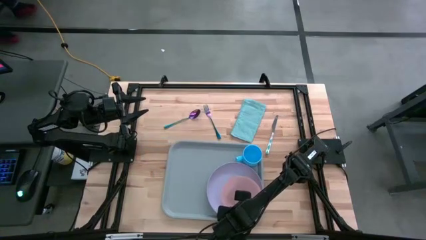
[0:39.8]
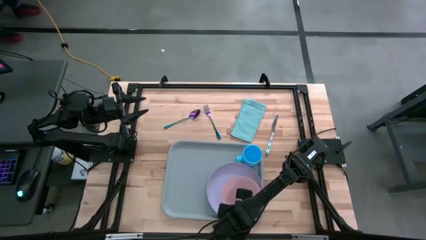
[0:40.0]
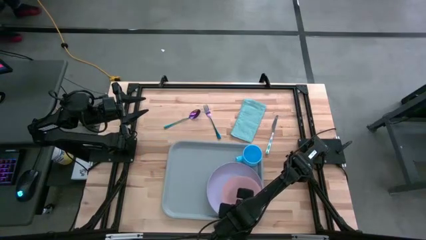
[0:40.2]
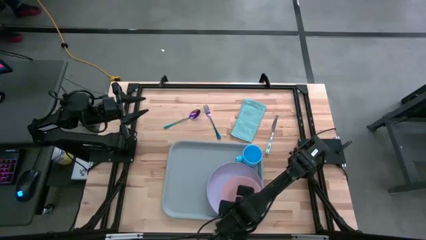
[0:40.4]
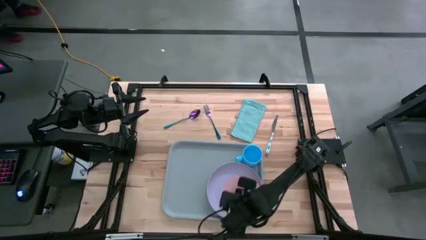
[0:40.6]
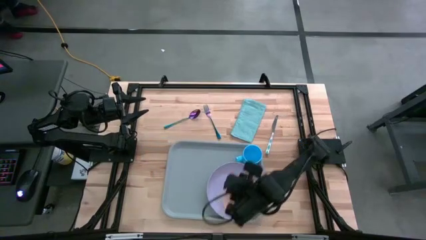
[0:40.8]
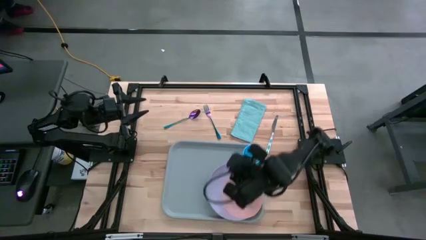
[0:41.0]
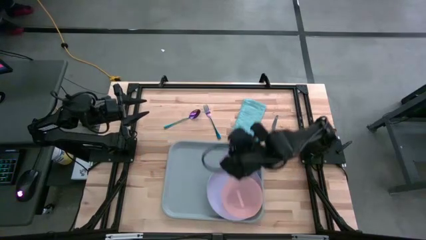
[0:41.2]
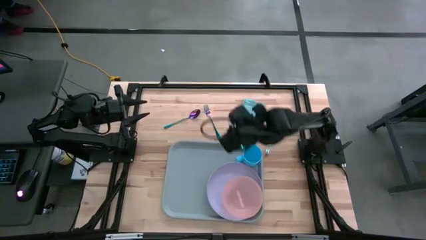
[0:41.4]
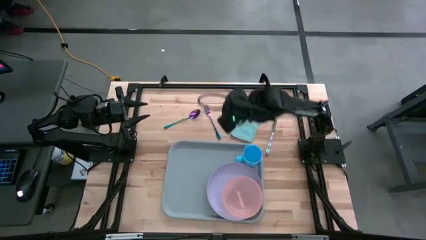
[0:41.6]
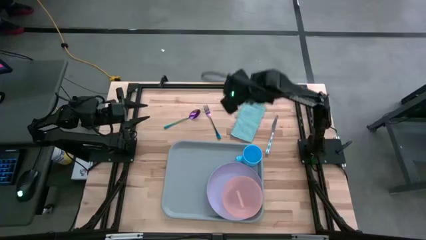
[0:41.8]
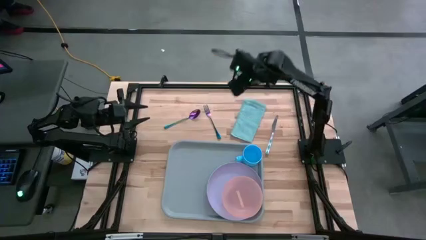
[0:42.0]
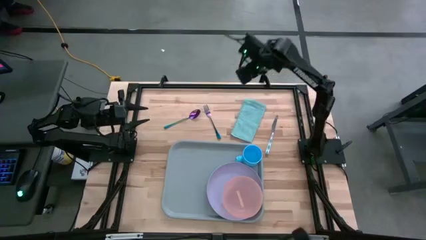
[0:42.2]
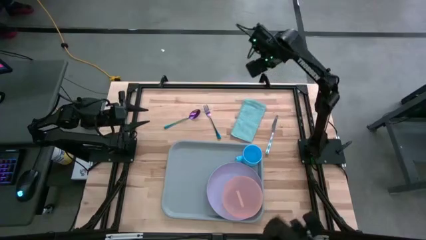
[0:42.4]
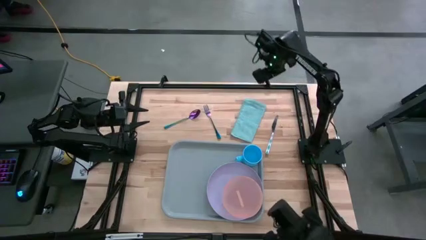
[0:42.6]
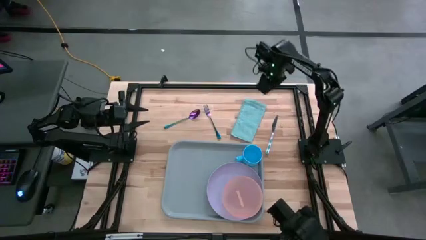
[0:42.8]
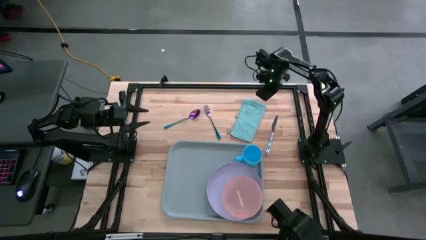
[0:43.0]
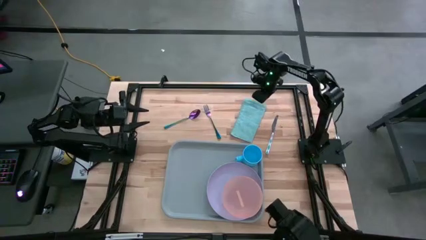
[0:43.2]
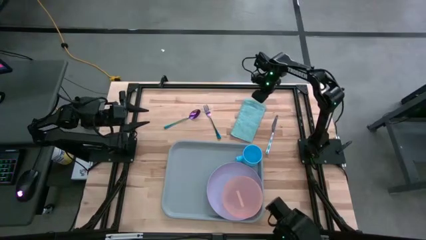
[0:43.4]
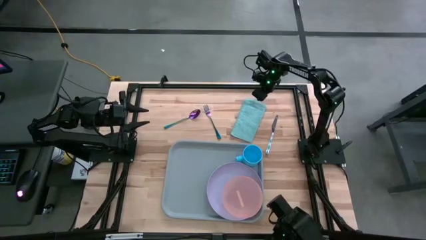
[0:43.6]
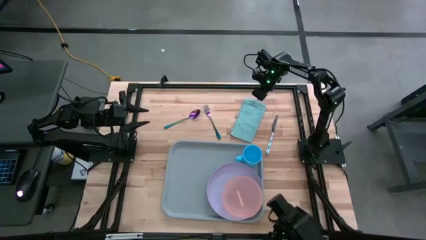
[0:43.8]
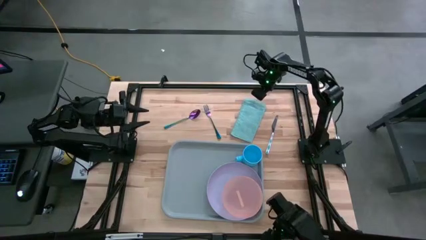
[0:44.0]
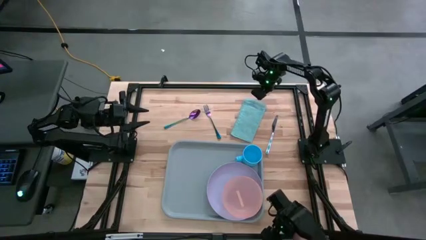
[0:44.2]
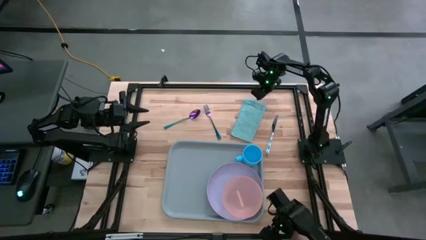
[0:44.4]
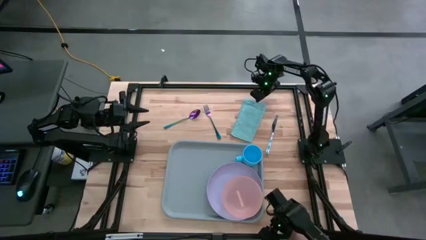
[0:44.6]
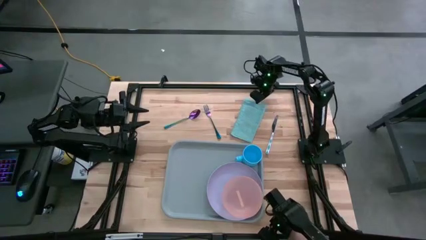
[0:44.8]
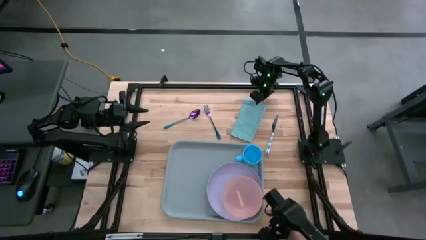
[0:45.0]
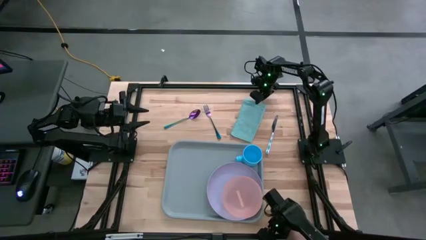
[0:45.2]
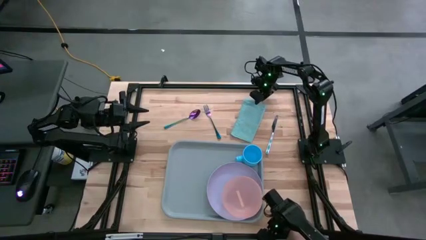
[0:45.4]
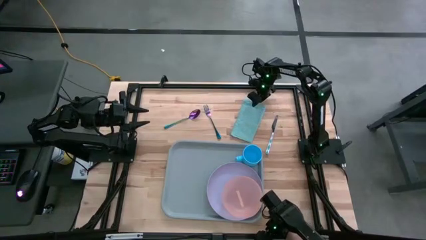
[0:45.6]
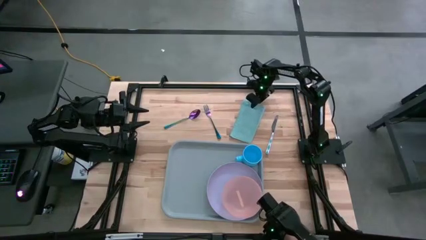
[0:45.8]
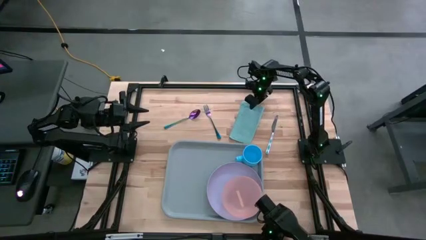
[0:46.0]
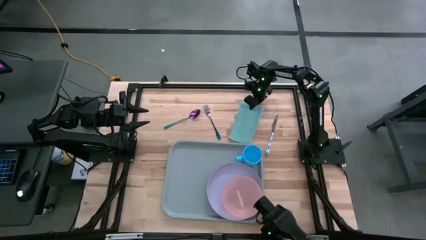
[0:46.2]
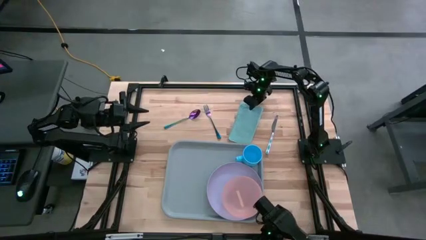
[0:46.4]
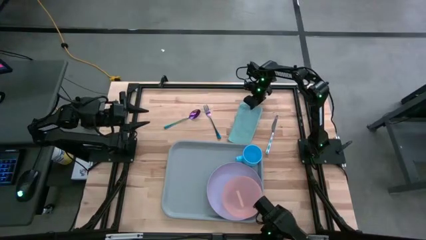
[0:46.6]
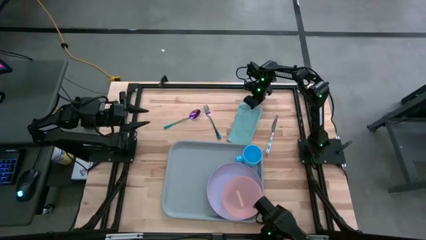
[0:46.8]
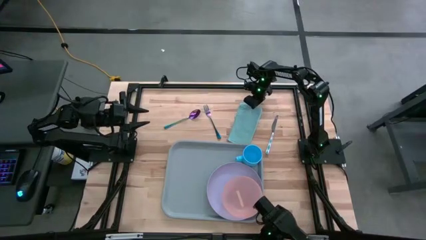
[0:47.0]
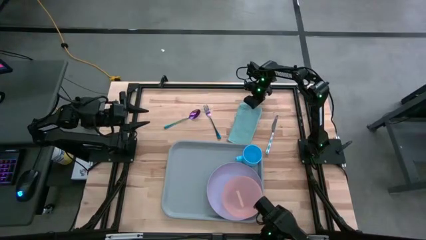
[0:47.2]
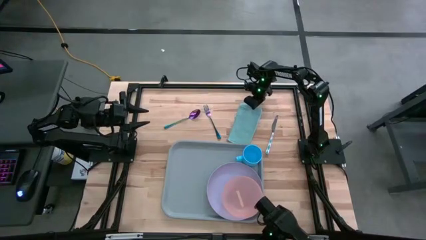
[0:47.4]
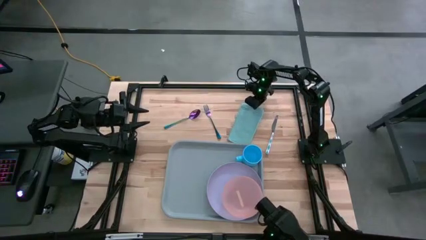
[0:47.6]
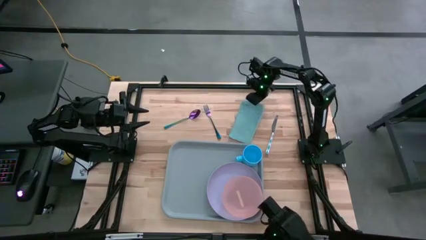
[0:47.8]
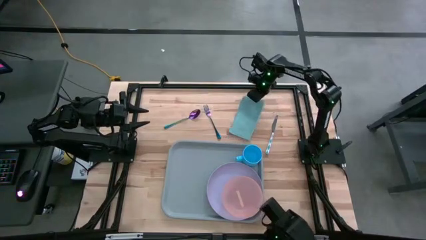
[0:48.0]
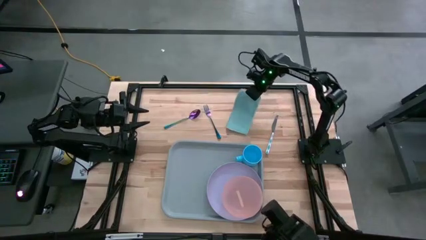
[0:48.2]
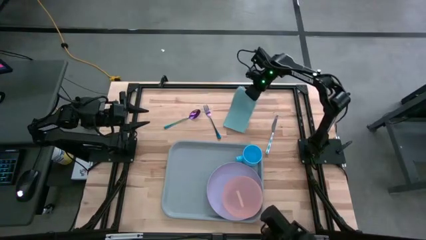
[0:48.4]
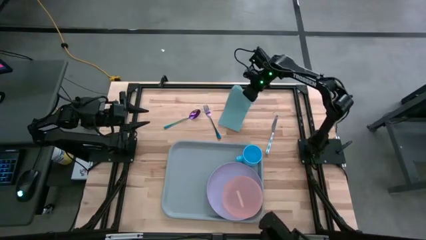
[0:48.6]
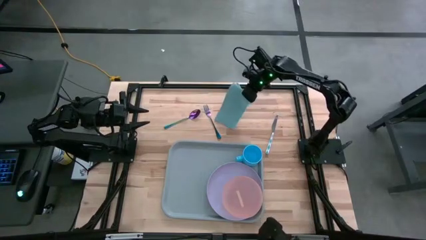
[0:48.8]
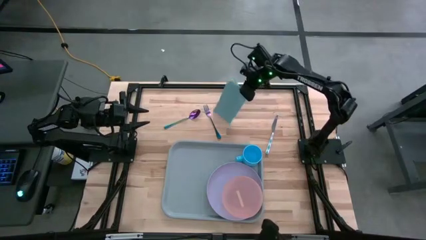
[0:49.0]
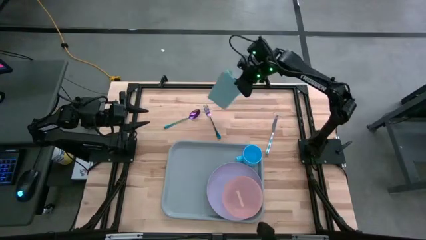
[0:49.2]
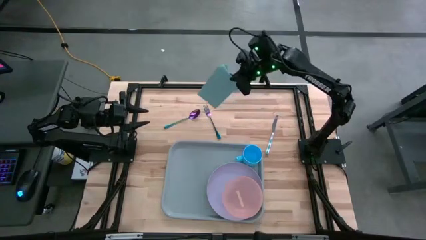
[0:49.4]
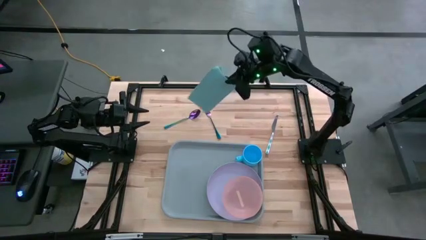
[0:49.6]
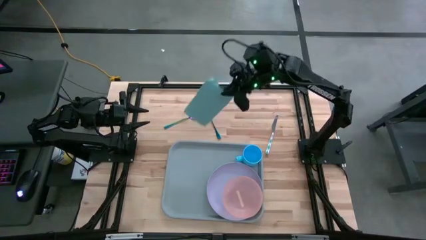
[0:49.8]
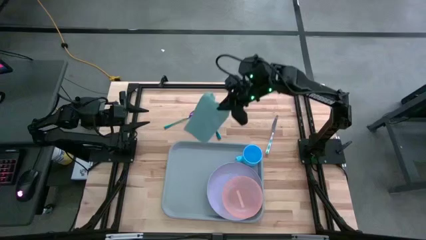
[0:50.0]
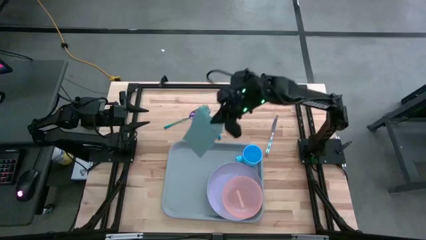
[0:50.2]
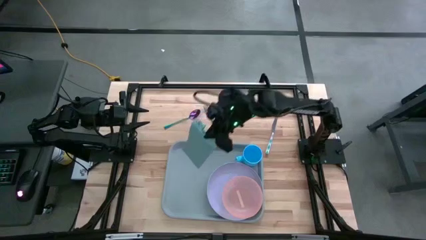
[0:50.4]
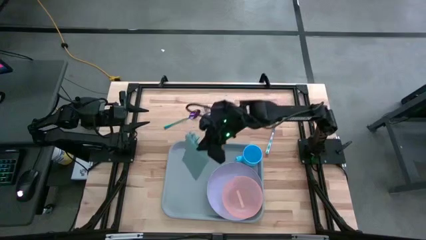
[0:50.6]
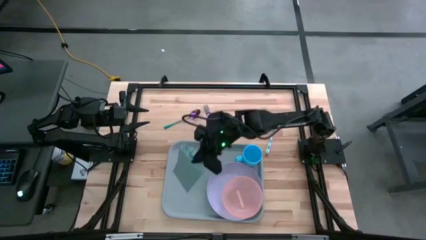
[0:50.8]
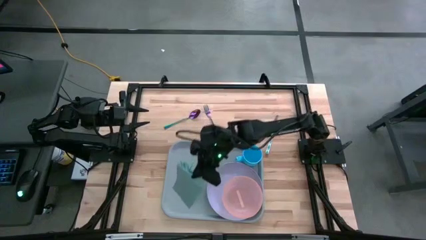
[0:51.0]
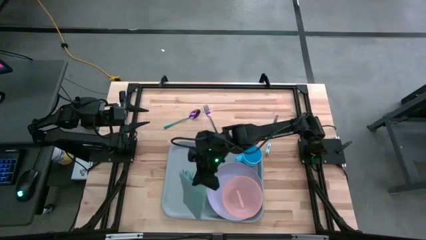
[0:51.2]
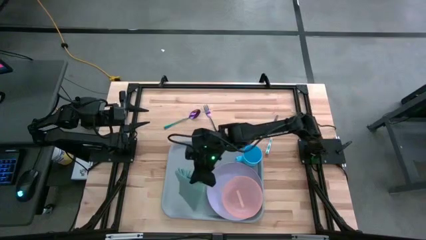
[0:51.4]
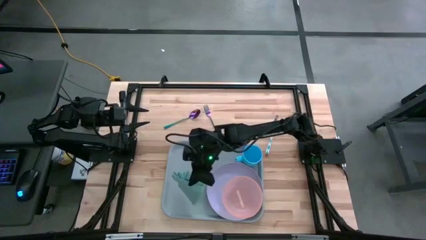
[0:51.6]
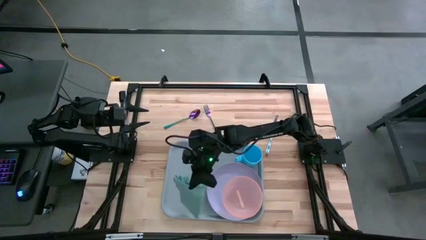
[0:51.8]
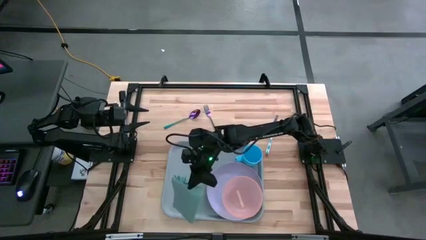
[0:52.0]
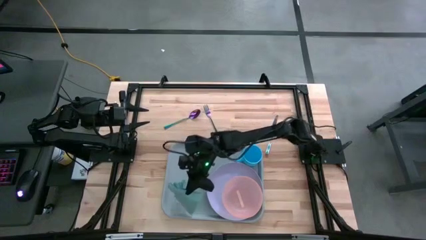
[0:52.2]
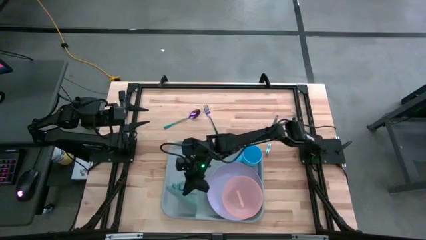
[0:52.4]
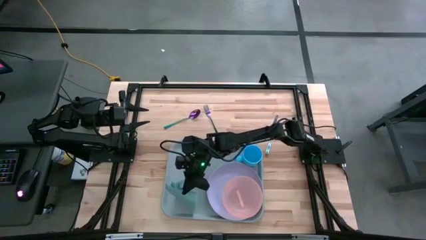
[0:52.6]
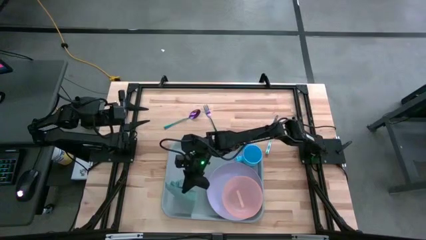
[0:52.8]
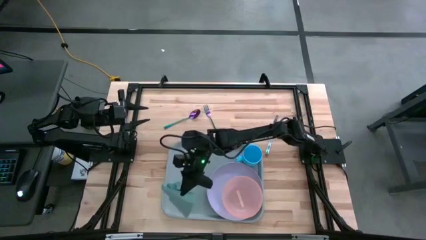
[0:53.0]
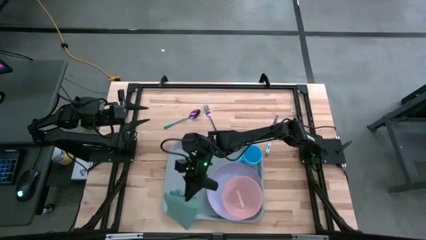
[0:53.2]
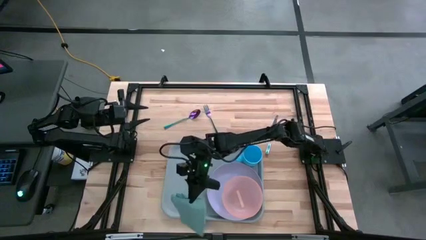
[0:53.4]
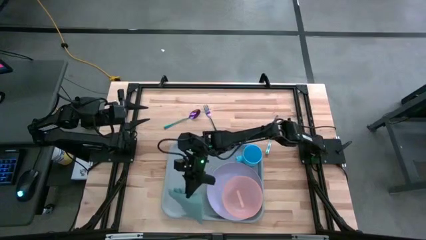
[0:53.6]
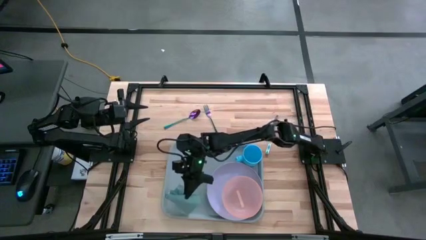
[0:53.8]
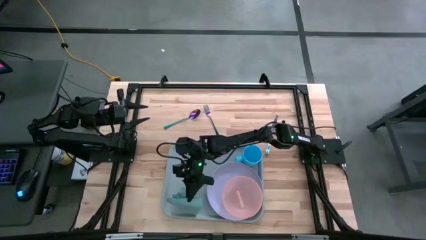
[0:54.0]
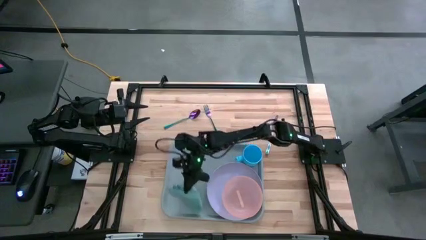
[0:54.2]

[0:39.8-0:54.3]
Task: Set up tray
Put the blue napkin on the serving tray to the left of the purple plate
